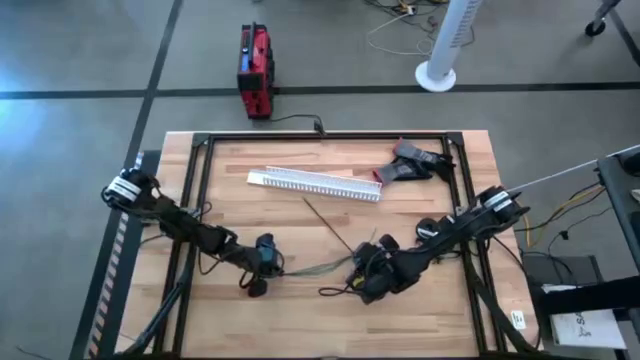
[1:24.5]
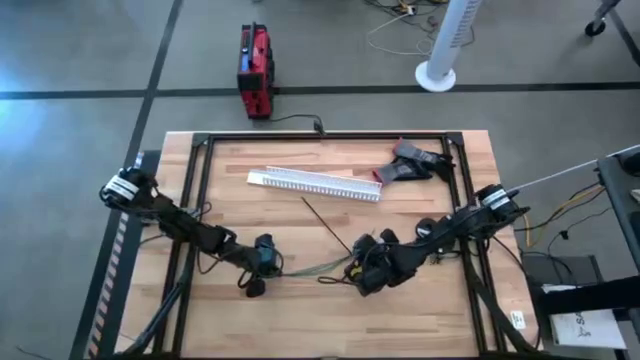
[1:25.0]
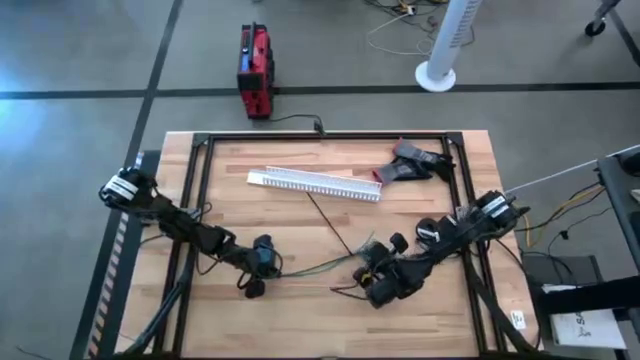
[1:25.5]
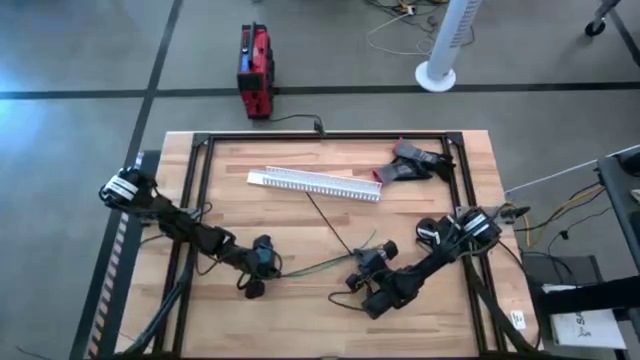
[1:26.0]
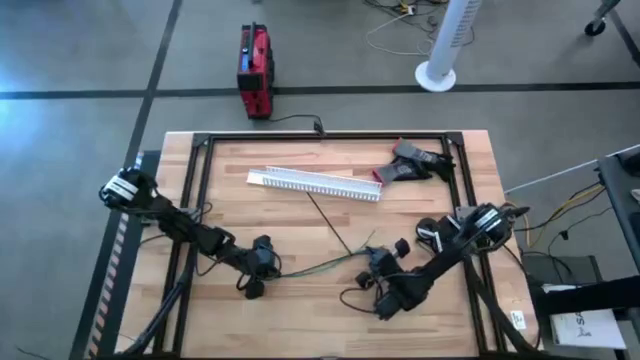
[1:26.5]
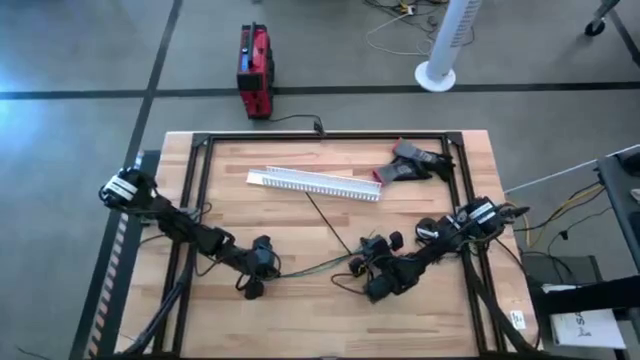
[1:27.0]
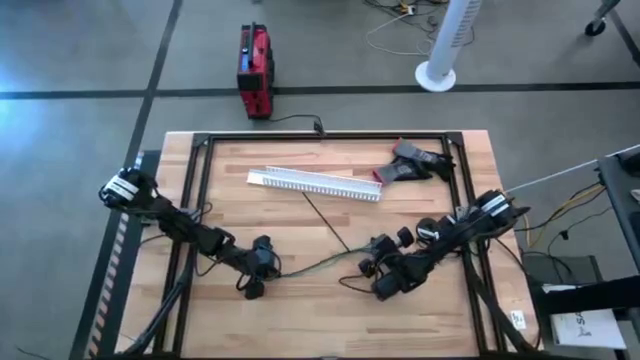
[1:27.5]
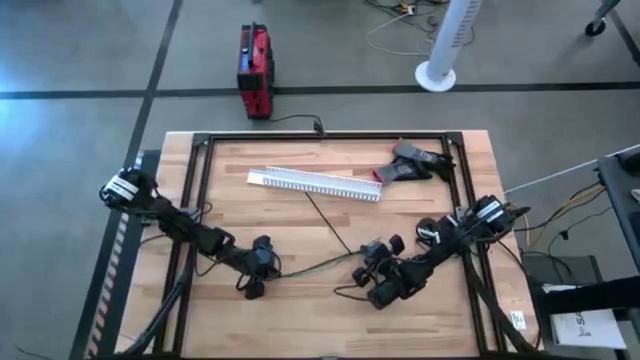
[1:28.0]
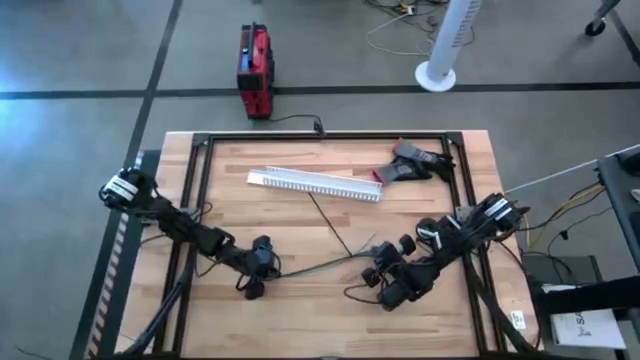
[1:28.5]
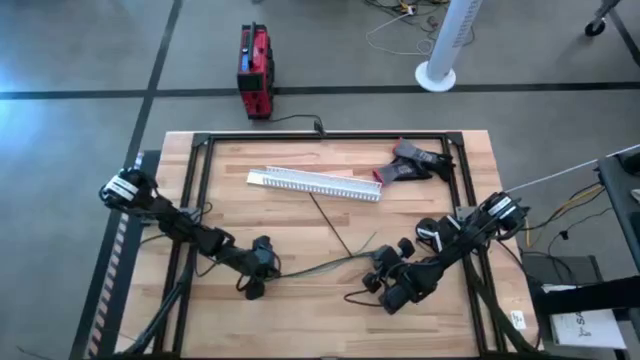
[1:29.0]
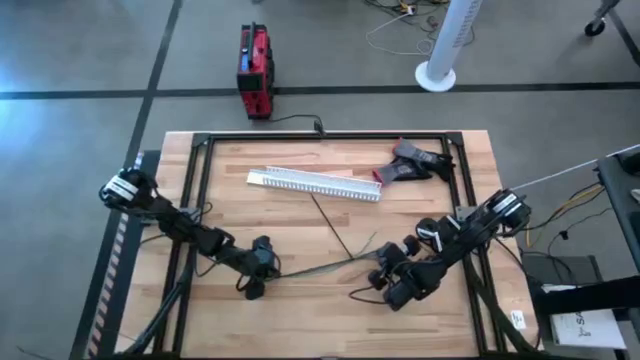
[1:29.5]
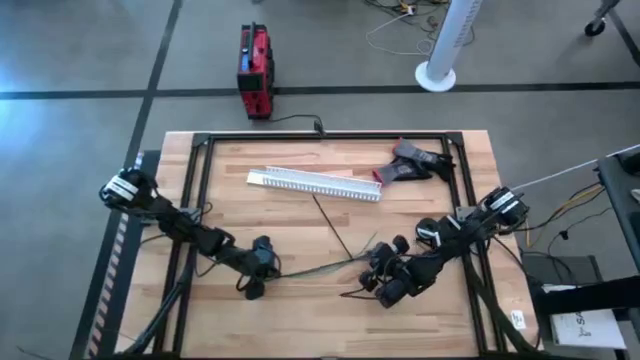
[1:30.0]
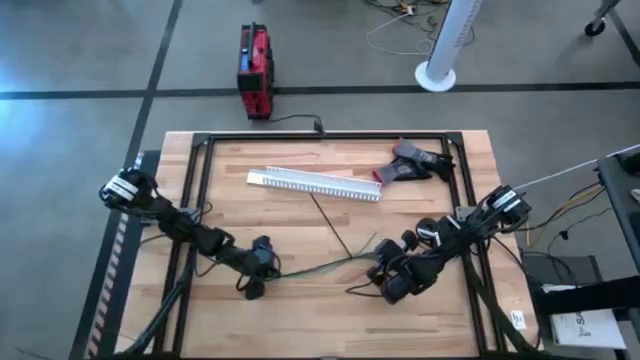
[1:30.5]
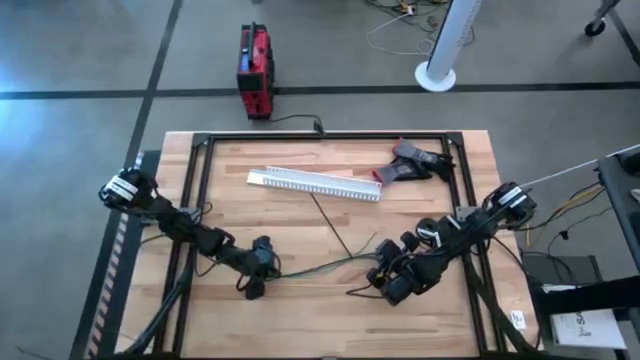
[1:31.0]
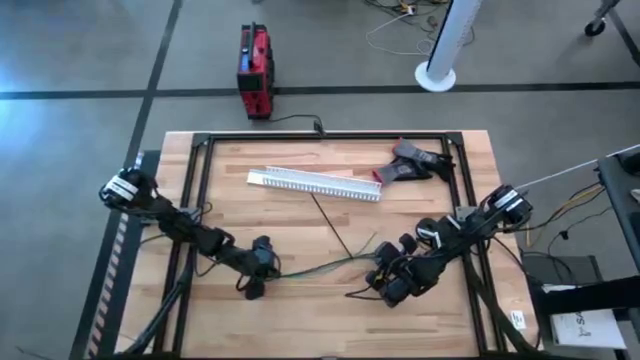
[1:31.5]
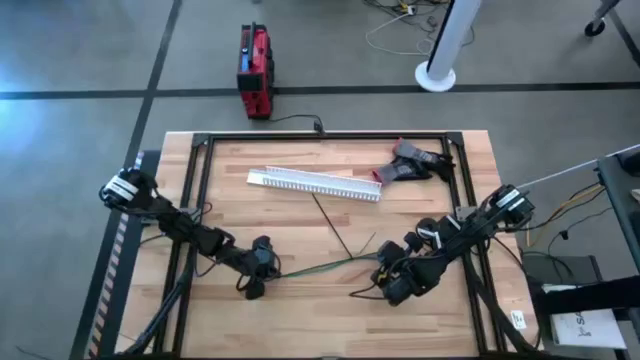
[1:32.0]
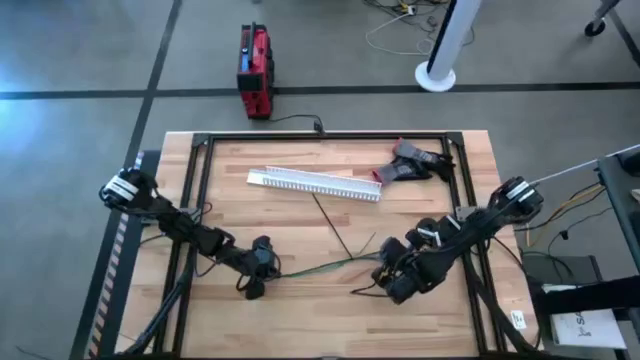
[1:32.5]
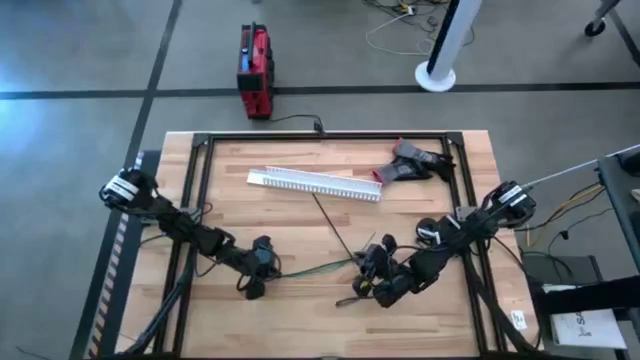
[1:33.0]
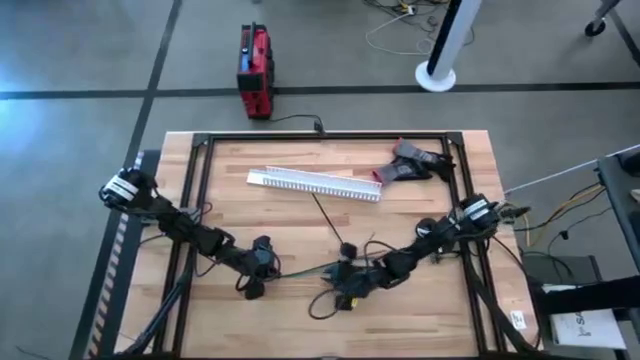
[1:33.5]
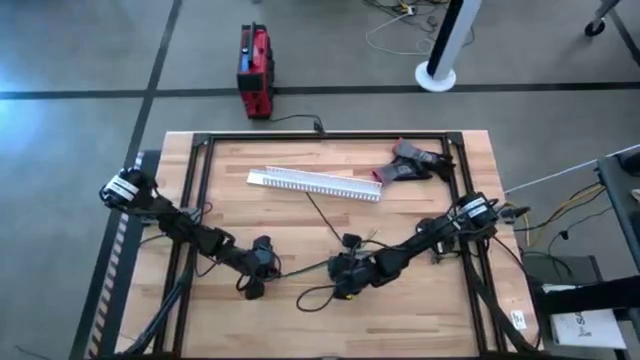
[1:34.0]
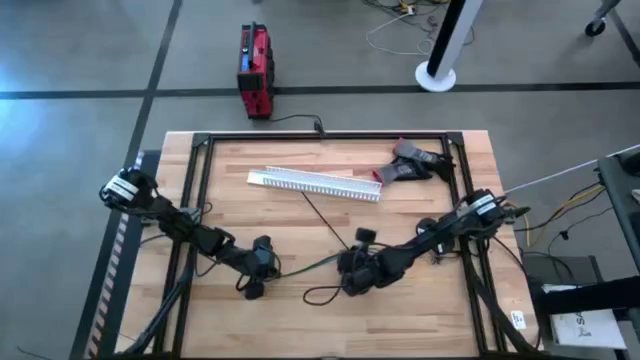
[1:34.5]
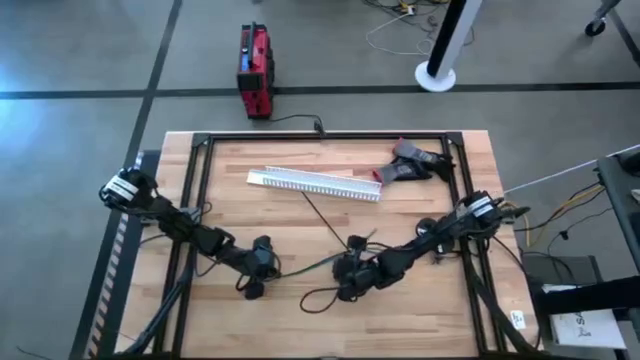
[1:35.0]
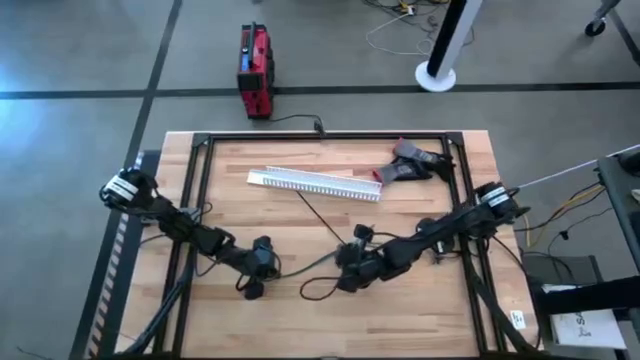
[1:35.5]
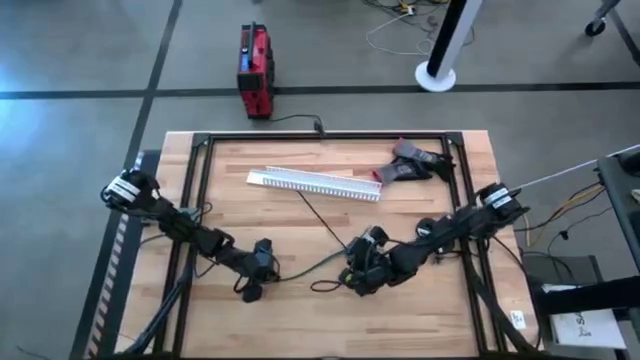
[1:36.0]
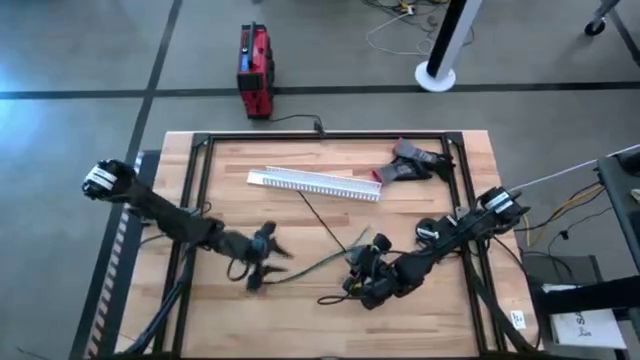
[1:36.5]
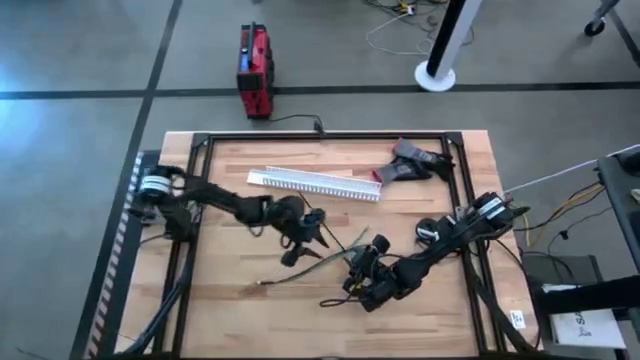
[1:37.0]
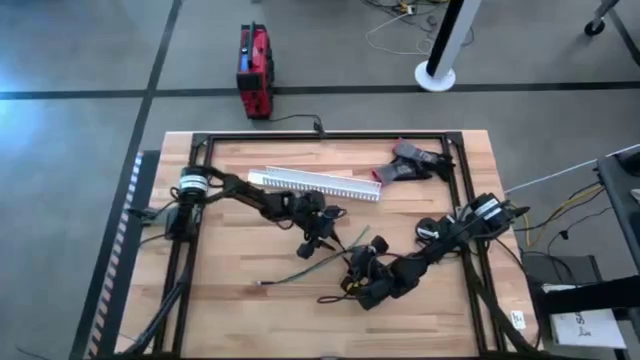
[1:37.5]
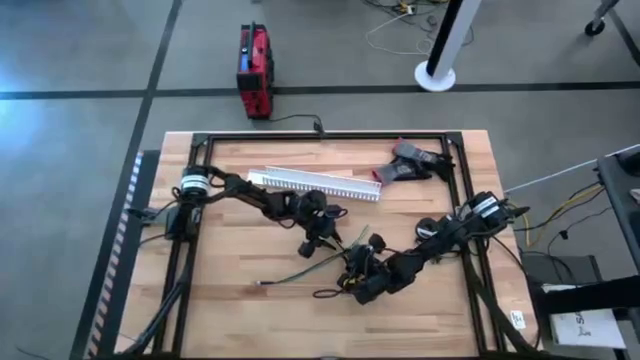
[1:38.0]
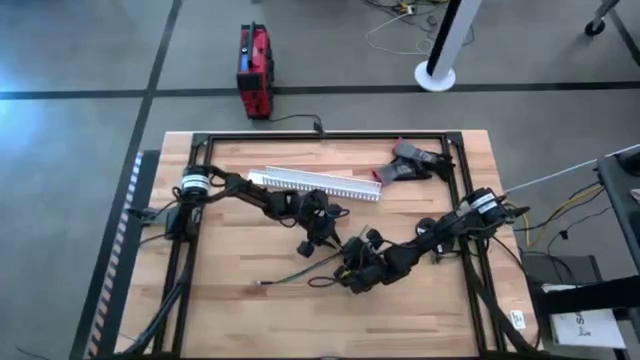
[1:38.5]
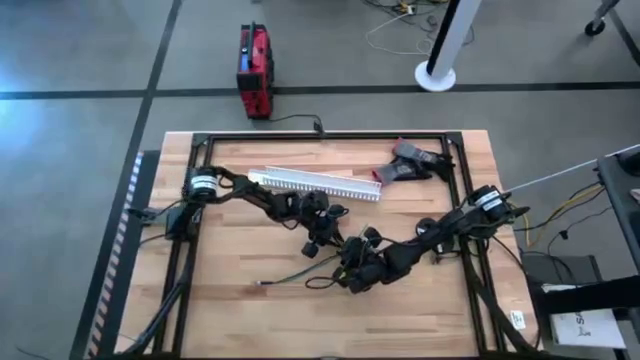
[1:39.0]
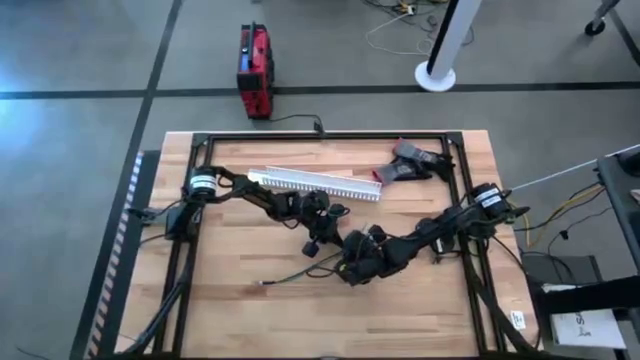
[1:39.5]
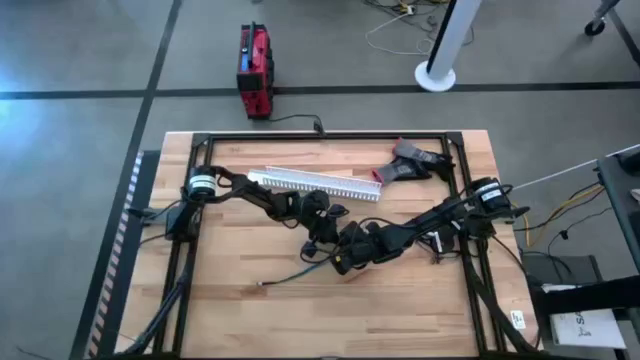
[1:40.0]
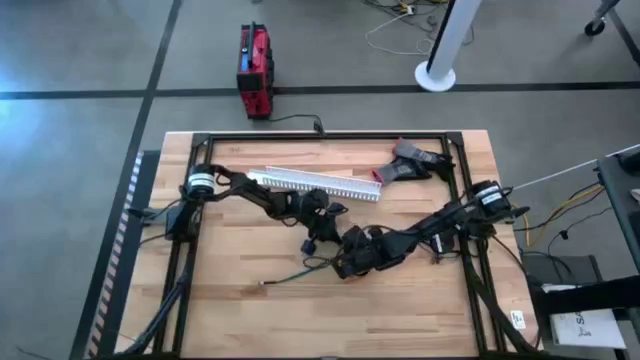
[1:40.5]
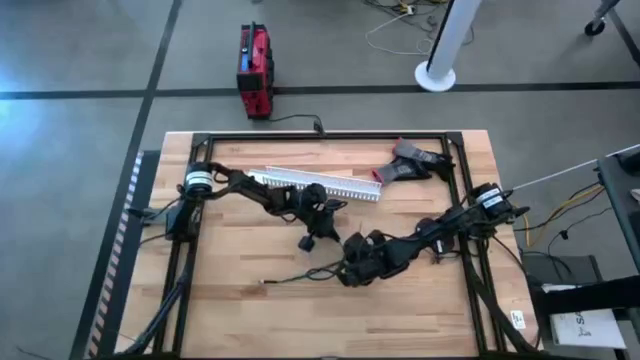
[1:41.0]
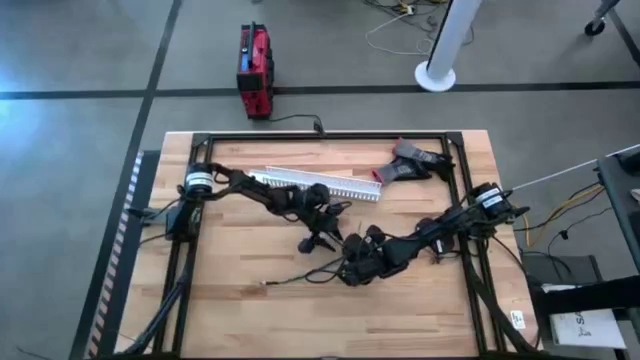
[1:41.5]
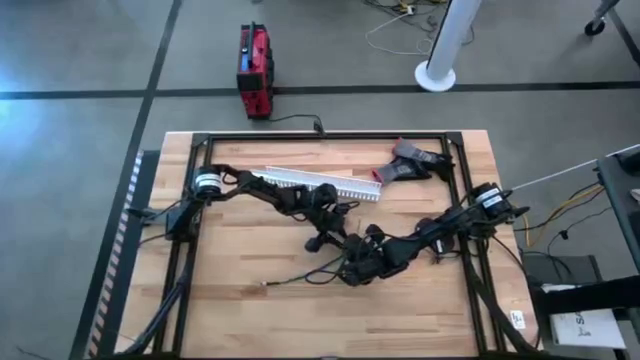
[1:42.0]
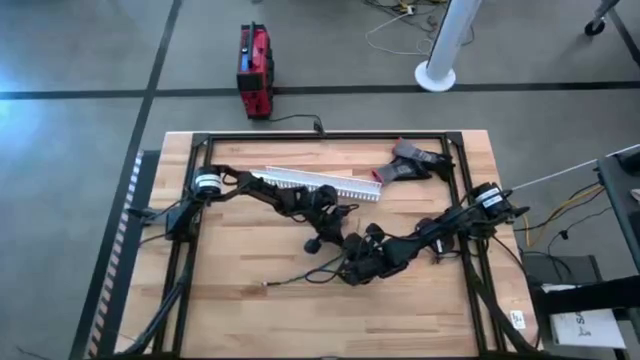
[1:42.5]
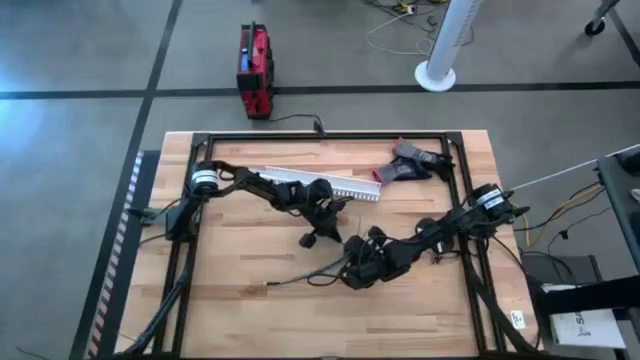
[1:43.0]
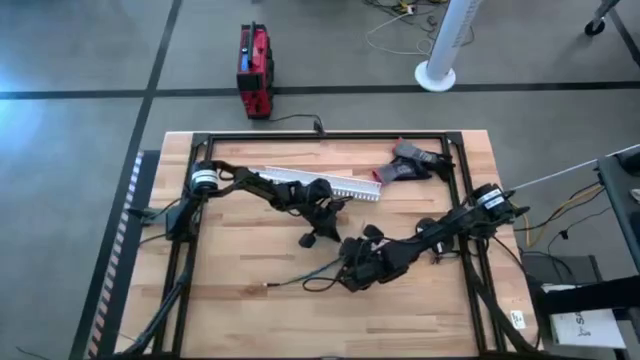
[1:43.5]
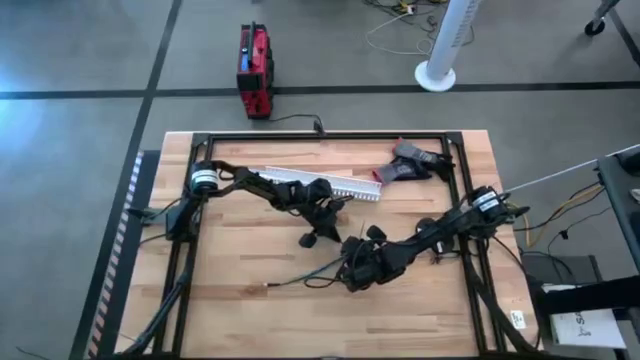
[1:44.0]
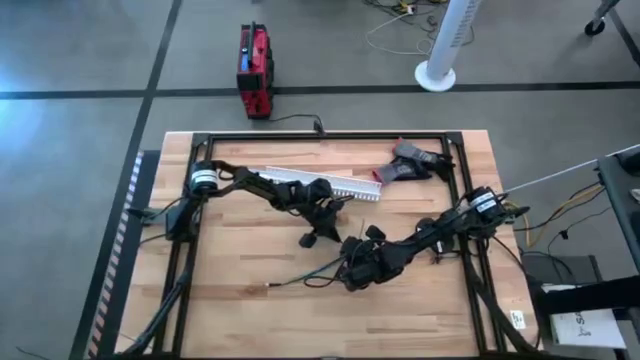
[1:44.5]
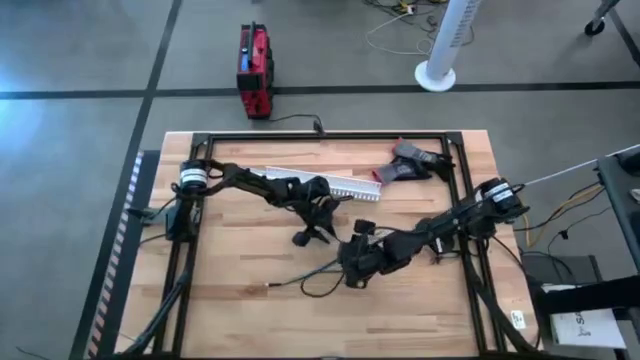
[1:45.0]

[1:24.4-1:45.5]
Task: Ziptie cables
Insert the black ziptie on the cable wires
